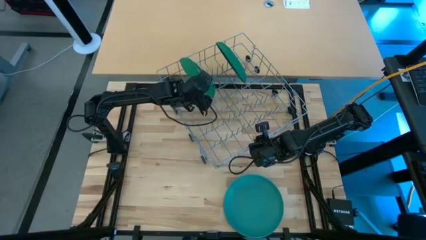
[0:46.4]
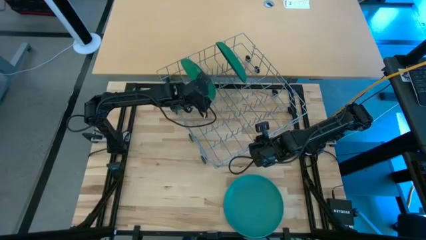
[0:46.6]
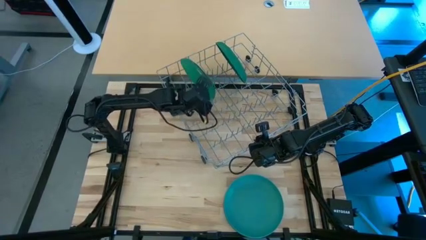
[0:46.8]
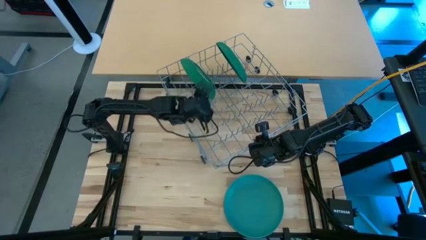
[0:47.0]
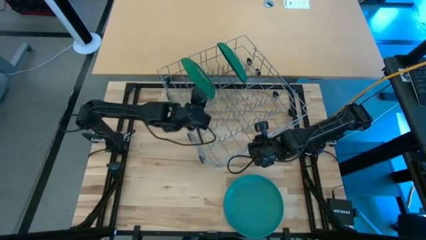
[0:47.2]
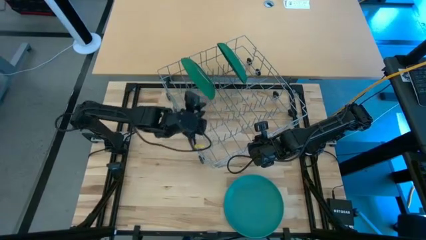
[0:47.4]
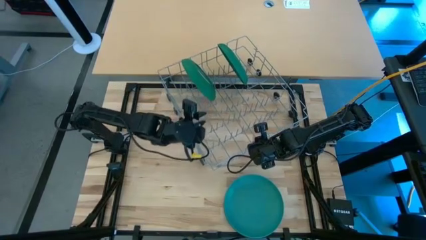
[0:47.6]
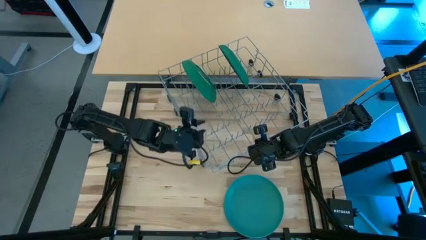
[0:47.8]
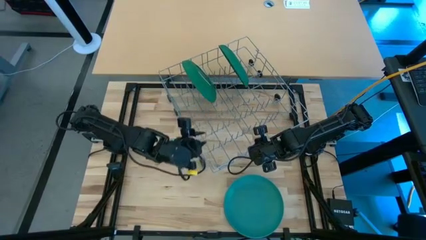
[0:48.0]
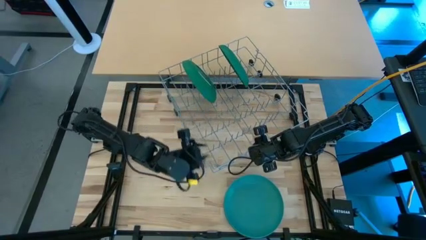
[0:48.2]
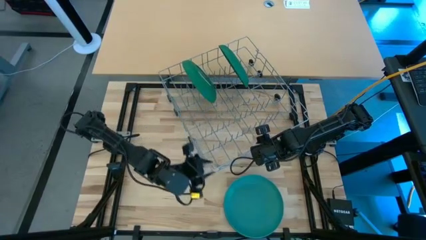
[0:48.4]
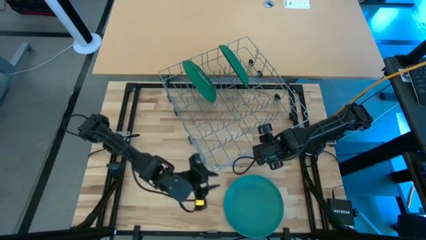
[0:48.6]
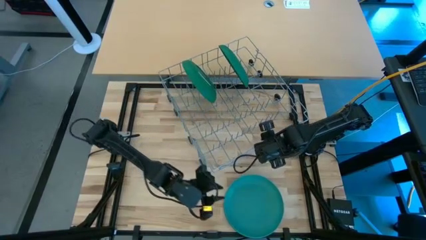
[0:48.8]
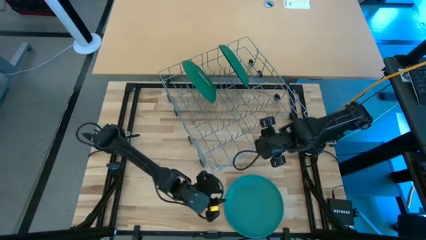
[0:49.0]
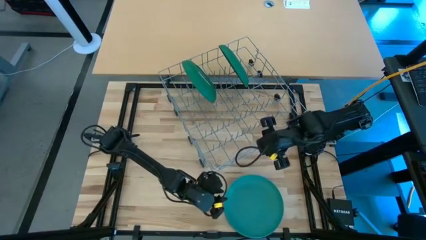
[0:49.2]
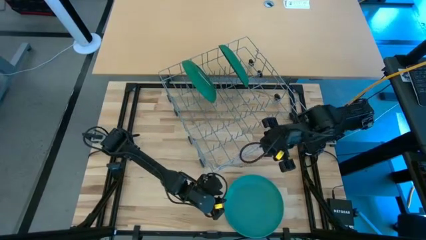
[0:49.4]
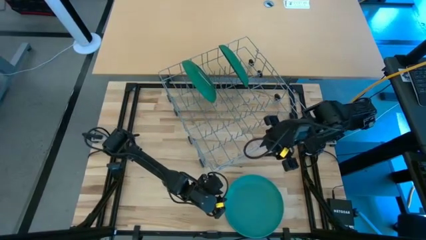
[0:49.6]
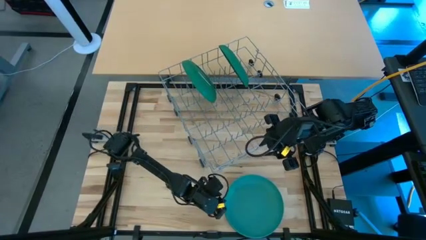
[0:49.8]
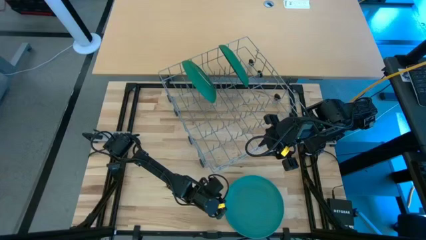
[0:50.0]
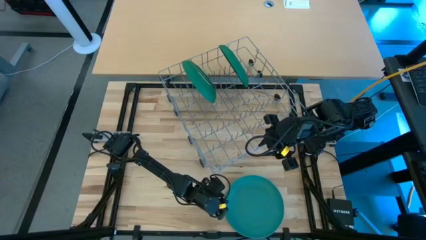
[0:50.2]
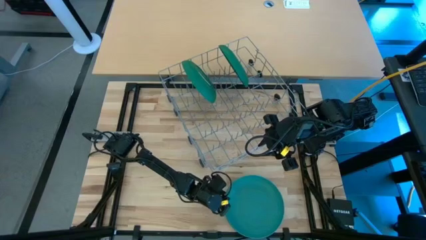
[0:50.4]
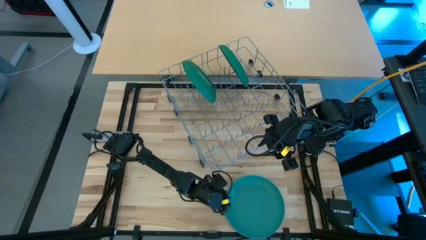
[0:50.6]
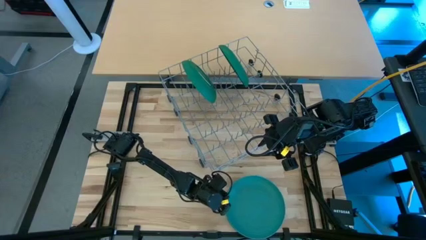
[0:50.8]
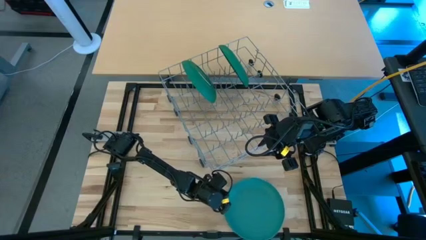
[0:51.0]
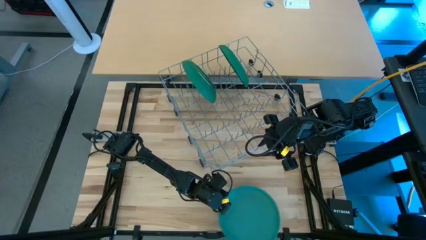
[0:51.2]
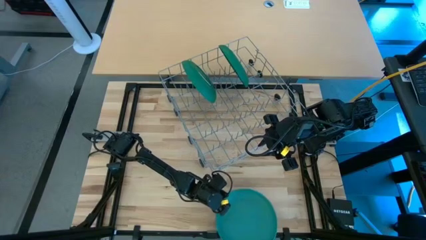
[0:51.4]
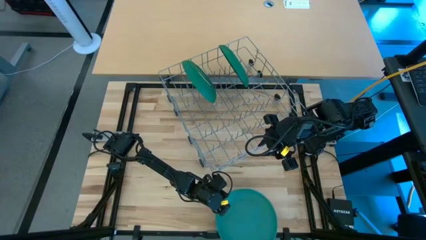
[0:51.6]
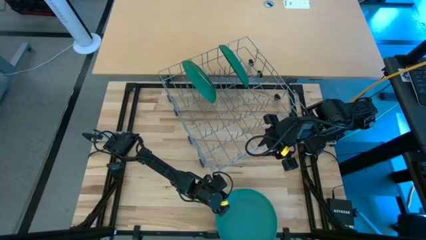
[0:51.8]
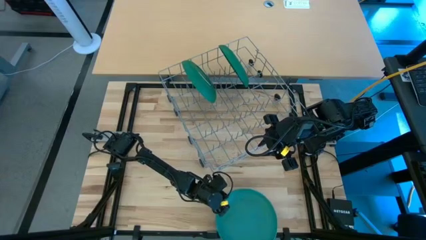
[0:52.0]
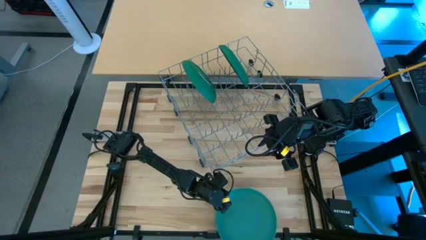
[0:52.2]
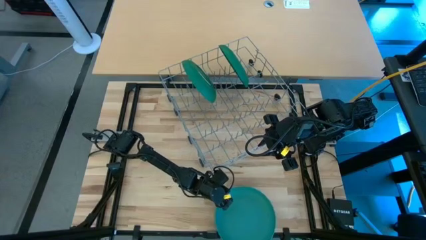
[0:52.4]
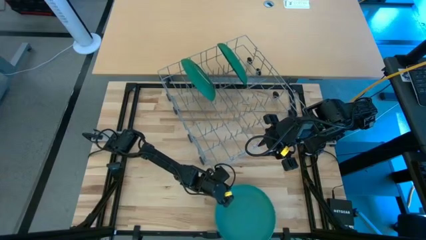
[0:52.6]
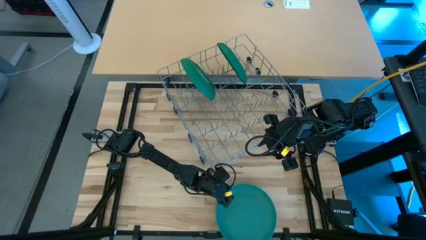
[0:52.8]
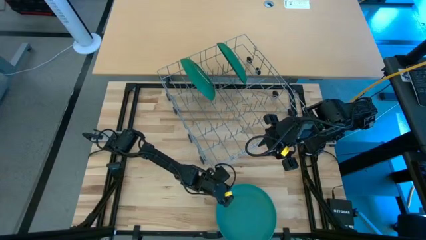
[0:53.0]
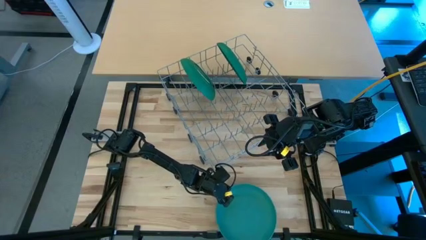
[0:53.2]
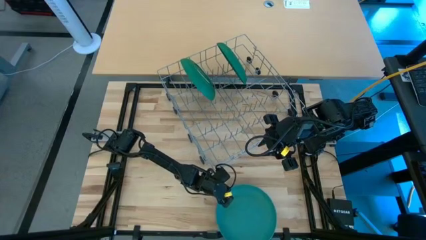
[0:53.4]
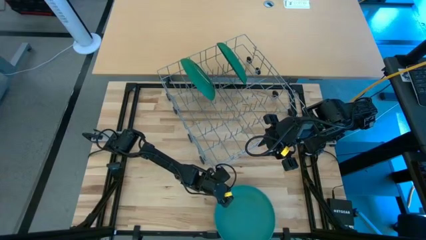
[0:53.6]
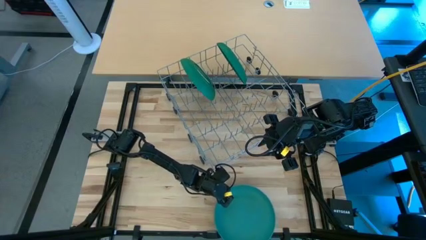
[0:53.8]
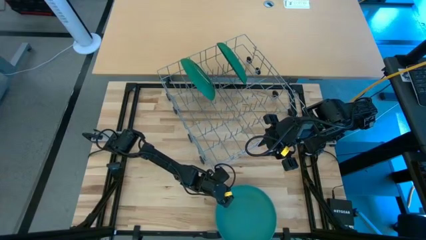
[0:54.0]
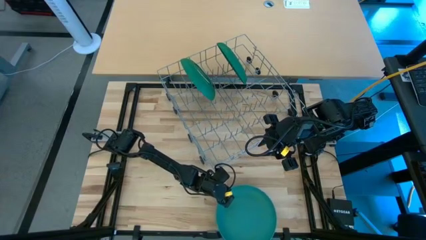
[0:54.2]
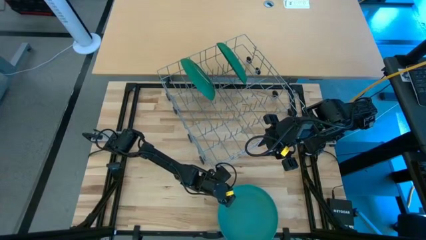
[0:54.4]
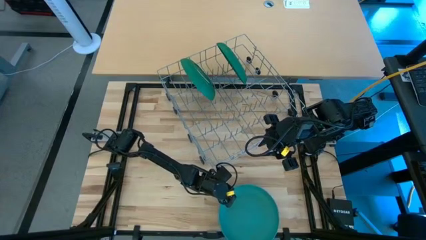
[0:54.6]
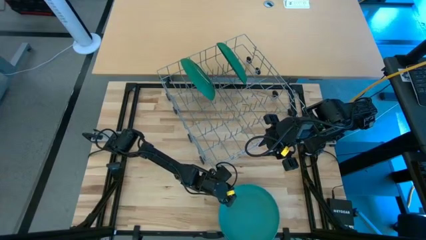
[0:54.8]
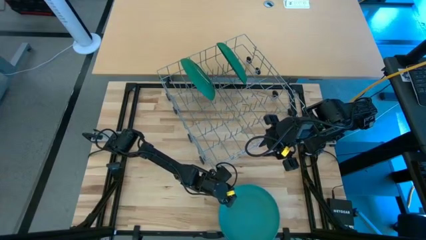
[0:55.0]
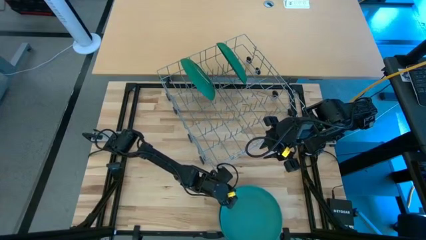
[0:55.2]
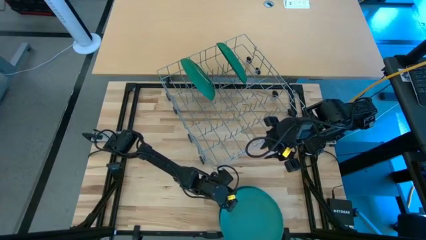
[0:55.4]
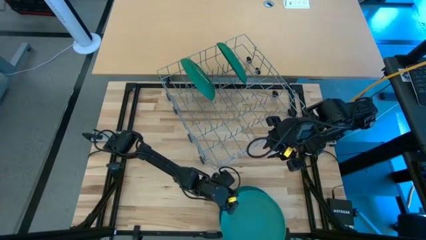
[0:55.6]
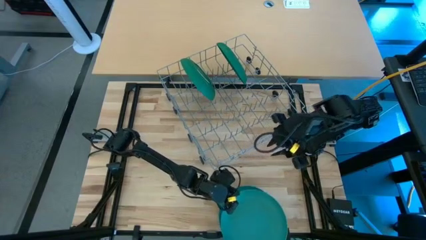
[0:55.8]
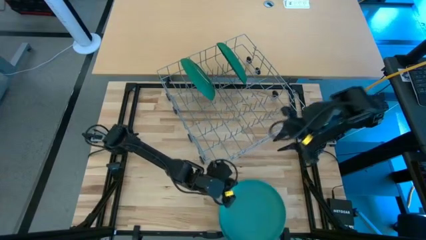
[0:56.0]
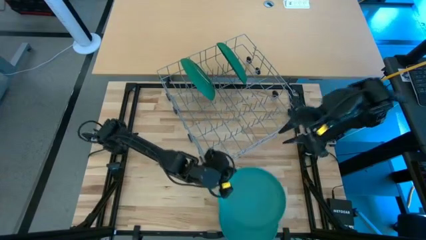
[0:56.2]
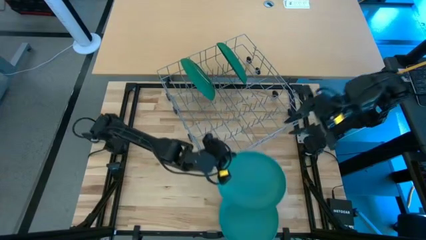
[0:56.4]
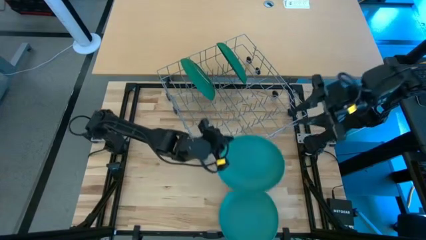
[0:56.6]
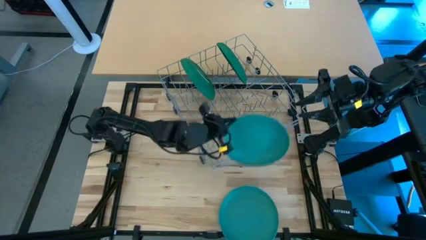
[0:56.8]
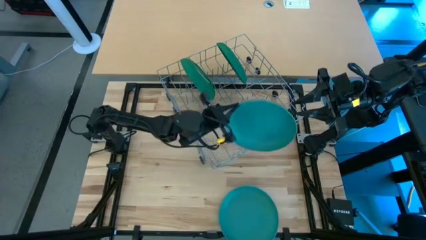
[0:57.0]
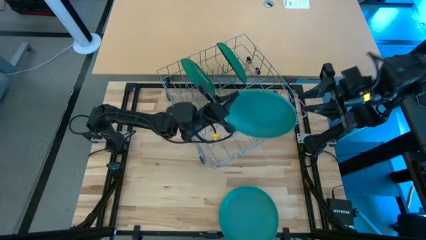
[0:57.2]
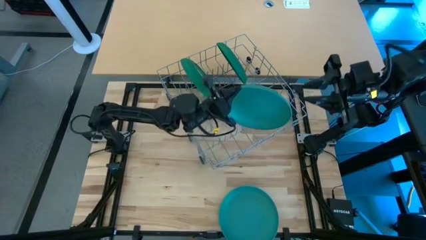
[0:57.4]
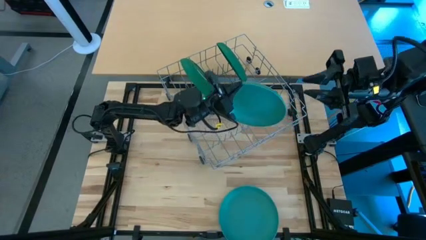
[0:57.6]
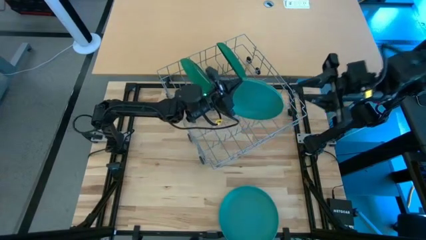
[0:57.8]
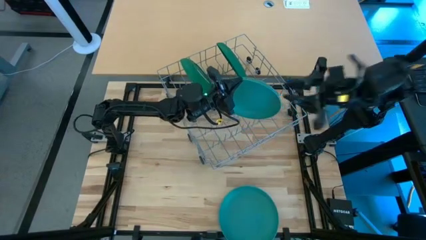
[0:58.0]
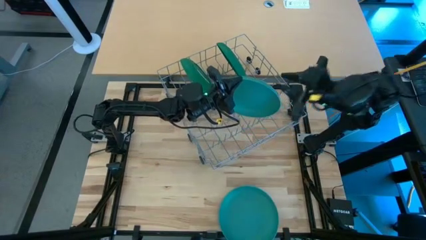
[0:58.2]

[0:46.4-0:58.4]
Task: Sort dishes
Put the blue plate into the dish rack

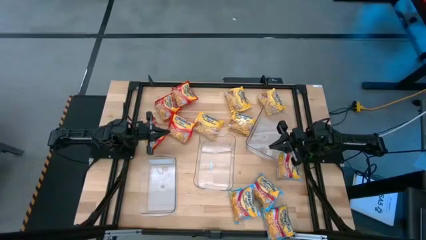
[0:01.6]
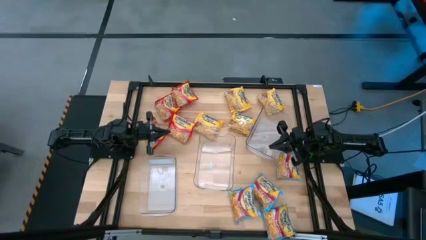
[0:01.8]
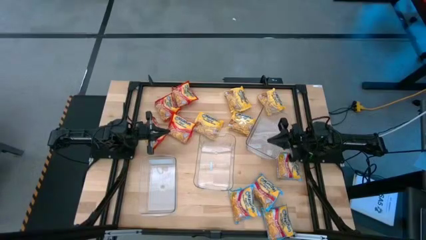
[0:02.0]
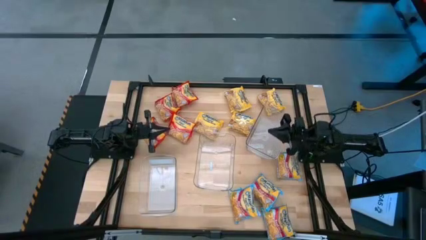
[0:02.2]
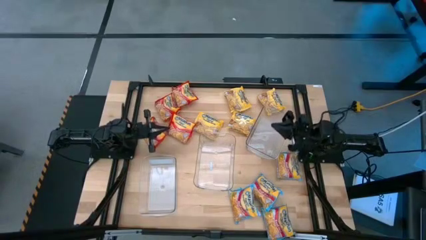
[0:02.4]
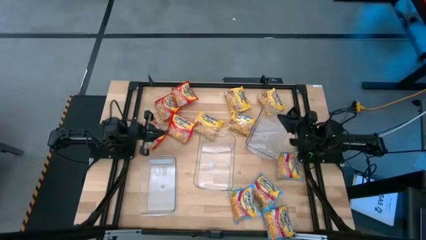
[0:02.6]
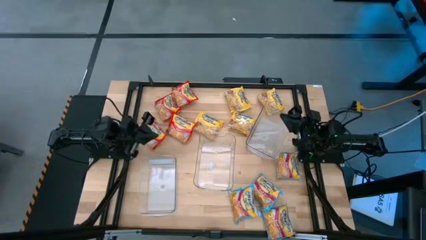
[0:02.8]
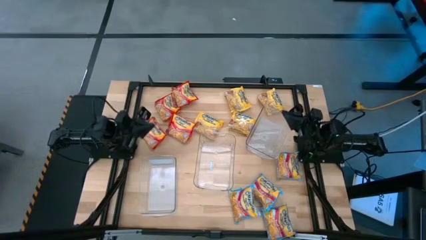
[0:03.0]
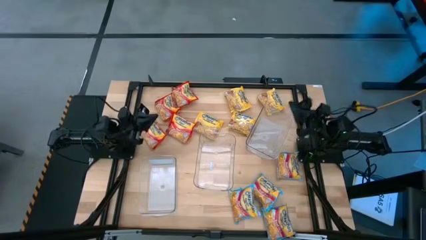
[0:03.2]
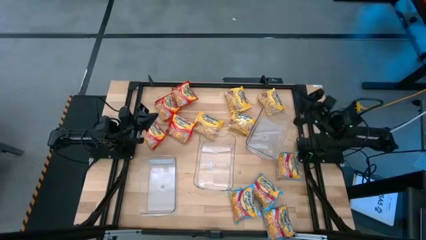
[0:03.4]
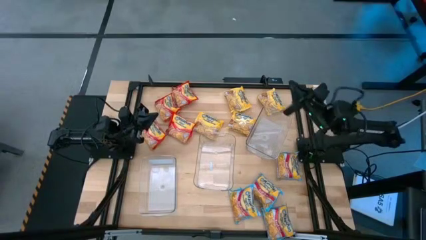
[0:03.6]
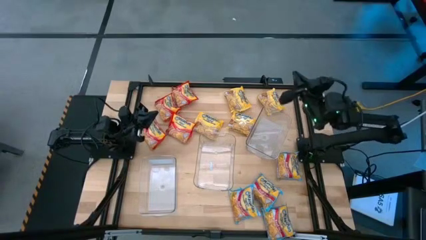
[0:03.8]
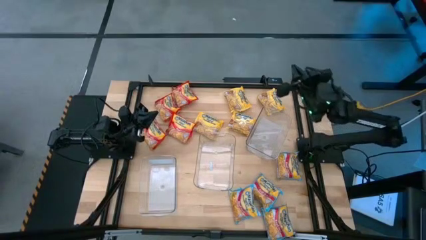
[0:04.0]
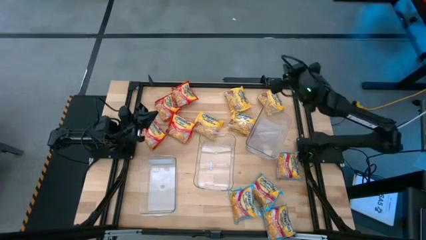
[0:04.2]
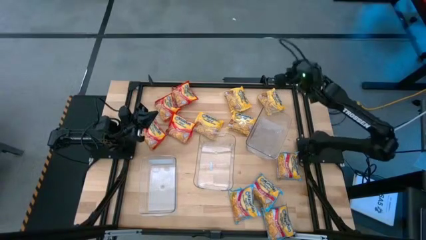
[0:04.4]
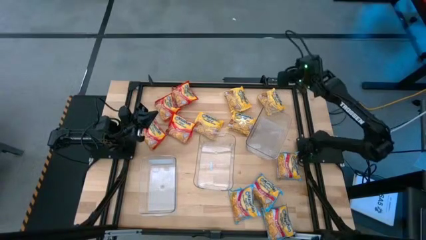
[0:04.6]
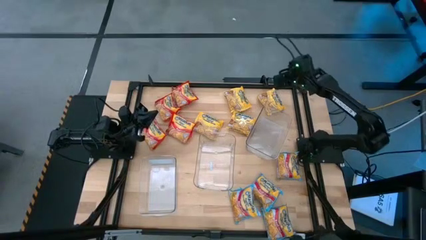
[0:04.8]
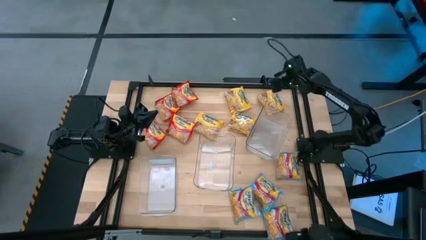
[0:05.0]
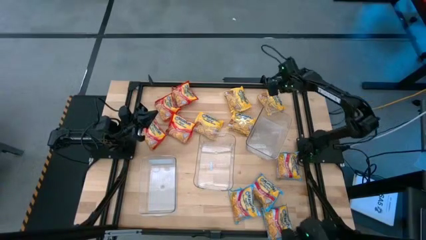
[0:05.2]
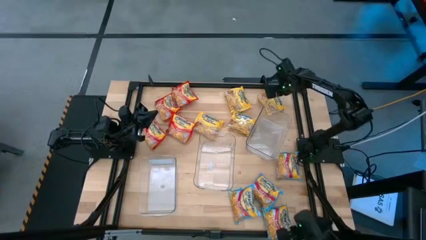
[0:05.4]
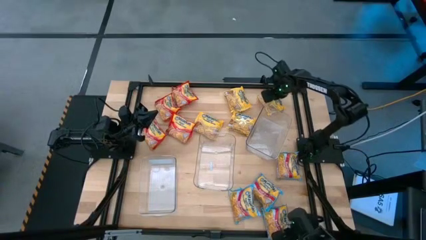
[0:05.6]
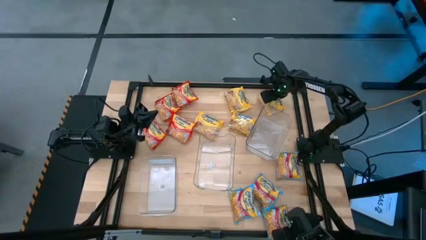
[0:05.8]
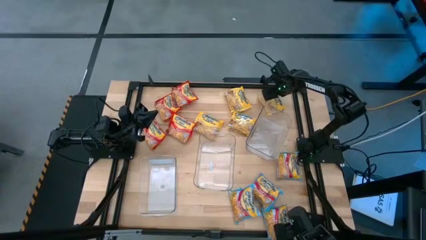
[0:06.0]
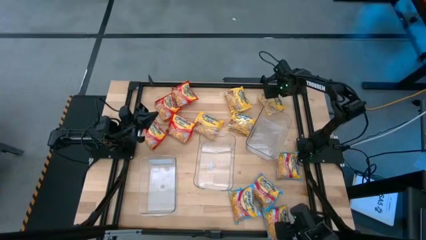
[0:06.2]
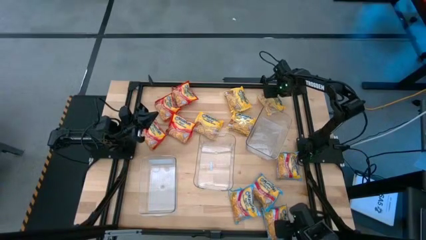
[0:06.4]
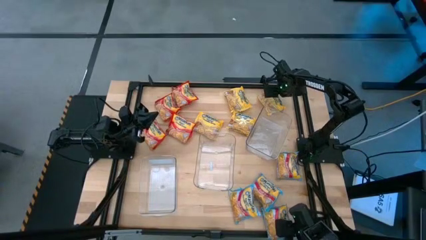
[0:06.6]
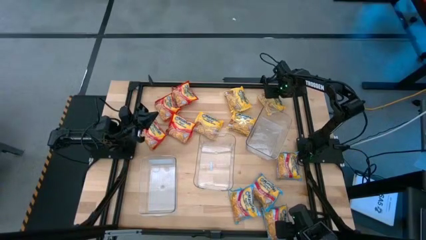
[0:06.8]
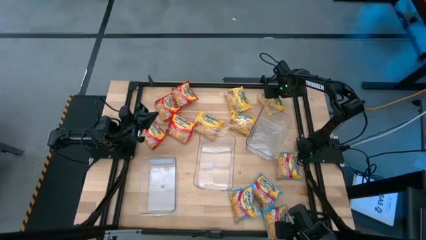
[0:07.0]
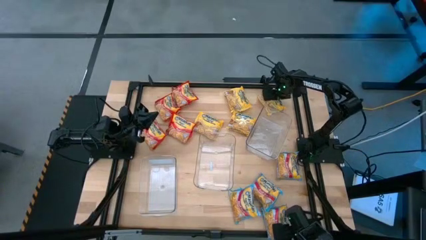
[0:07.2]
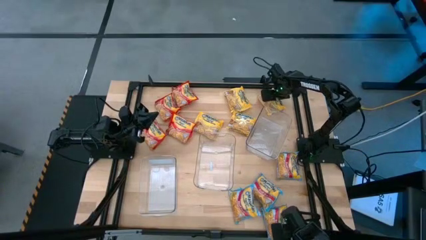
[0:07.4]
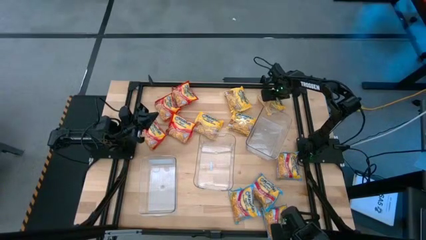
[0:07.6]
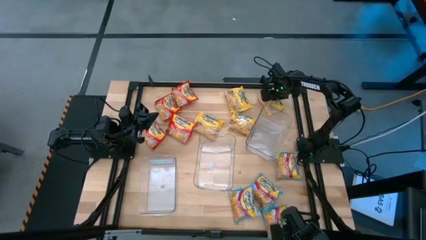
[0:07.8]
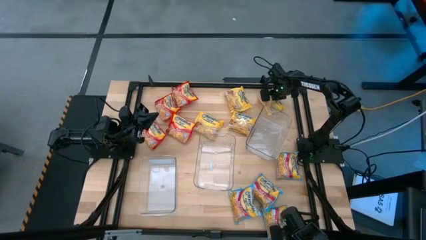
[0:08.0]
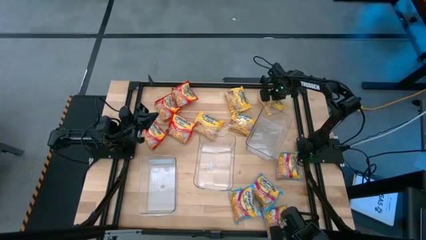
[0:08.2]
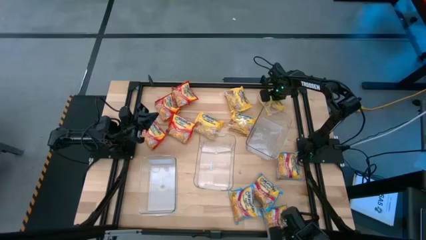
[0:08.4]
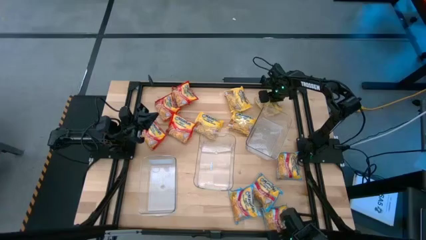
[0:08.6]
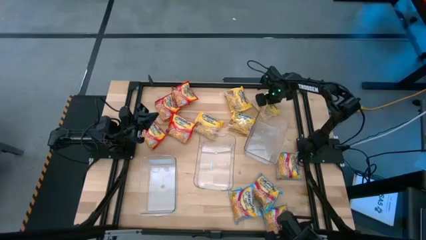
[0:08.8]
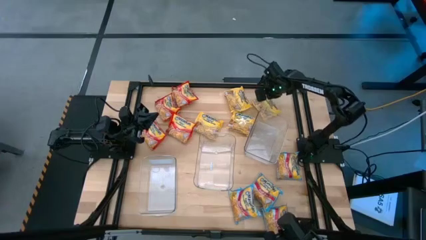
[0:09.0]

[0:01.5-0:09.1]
Task: Sort Maruchan noodles
Put the yellow noodle pack into the right transparent bin
